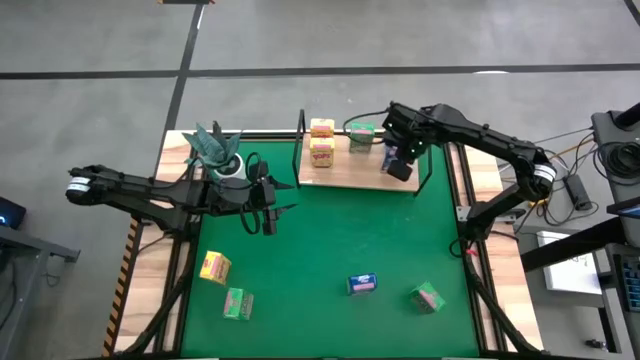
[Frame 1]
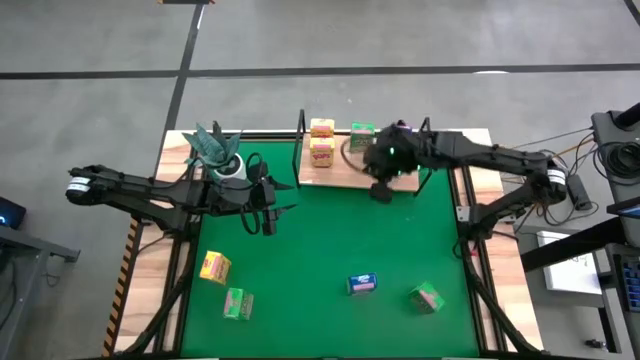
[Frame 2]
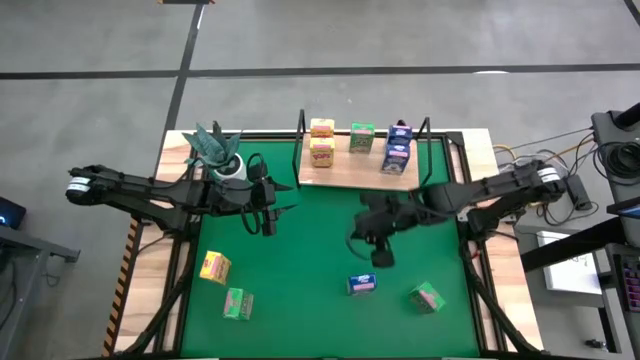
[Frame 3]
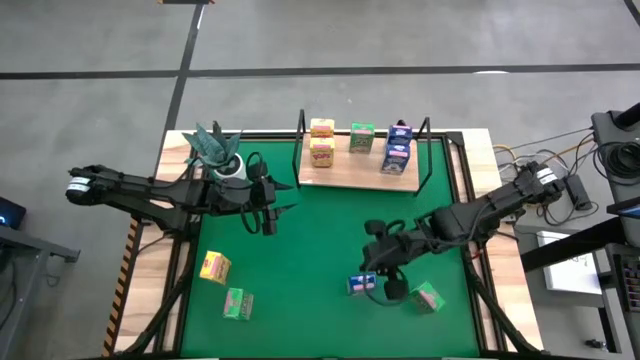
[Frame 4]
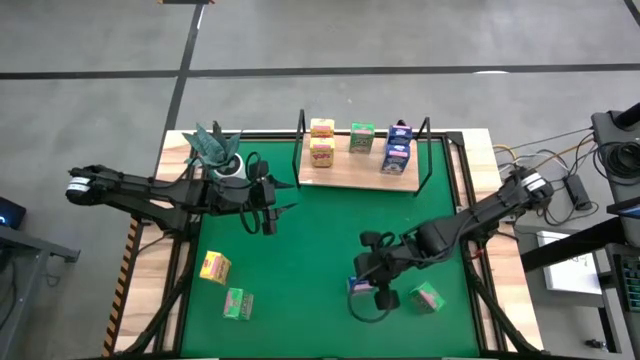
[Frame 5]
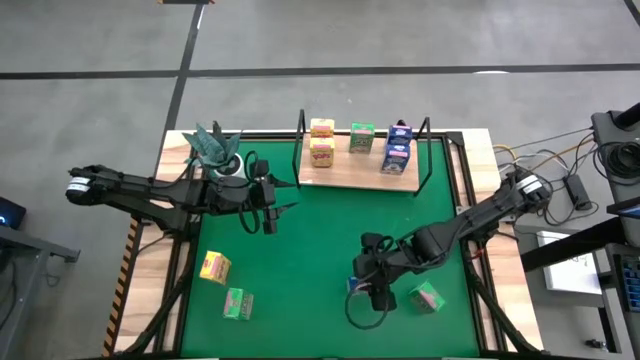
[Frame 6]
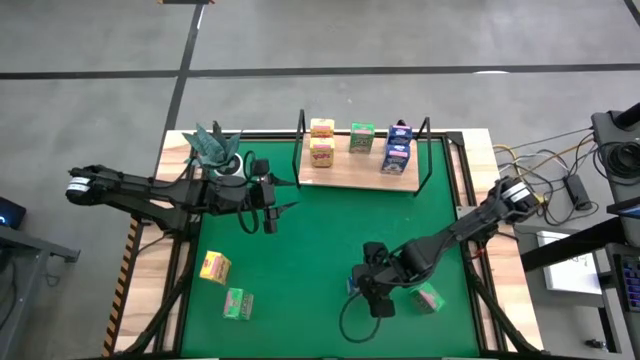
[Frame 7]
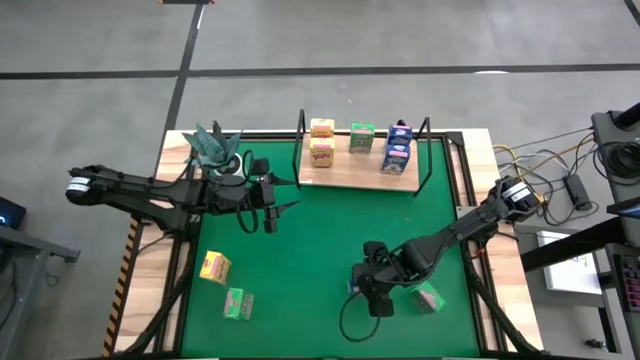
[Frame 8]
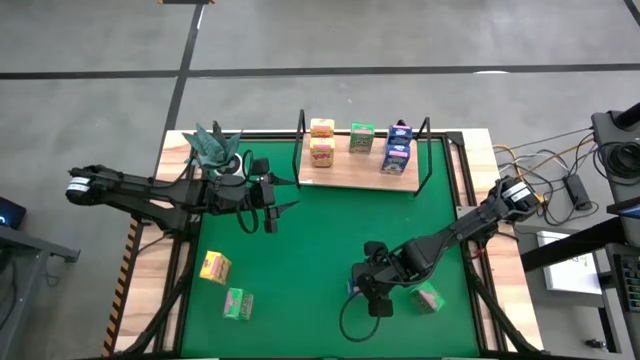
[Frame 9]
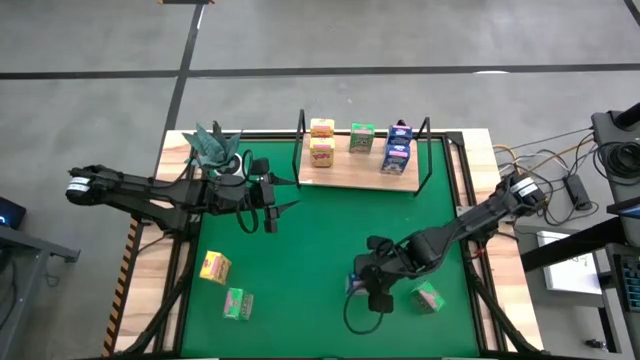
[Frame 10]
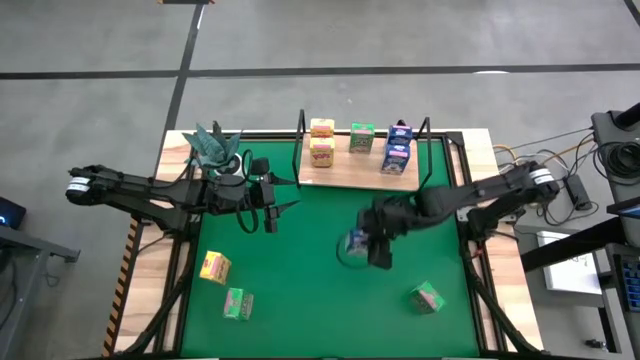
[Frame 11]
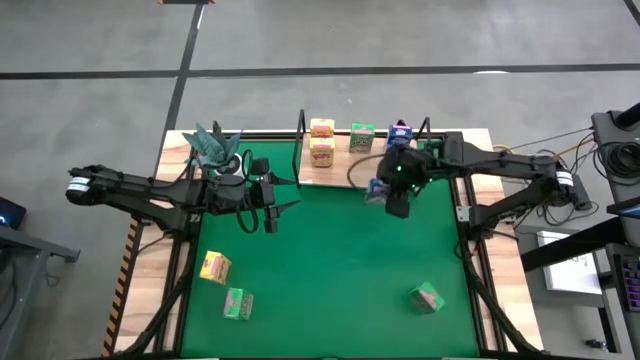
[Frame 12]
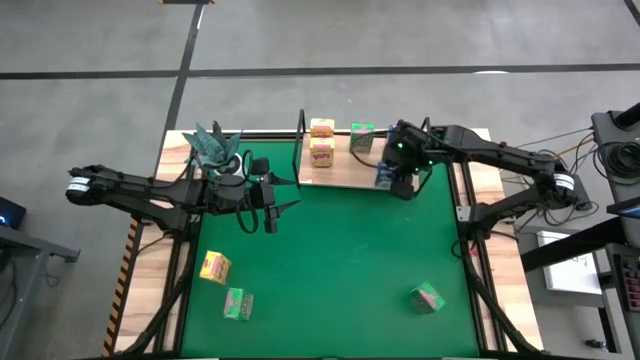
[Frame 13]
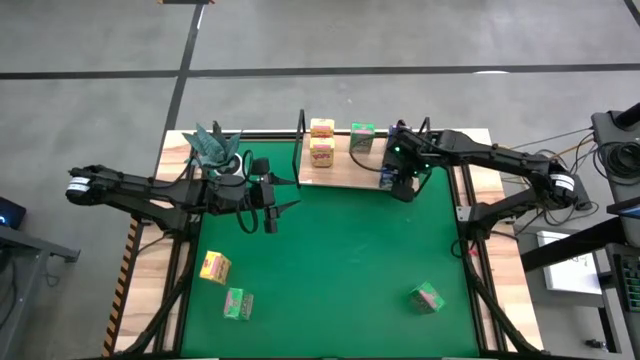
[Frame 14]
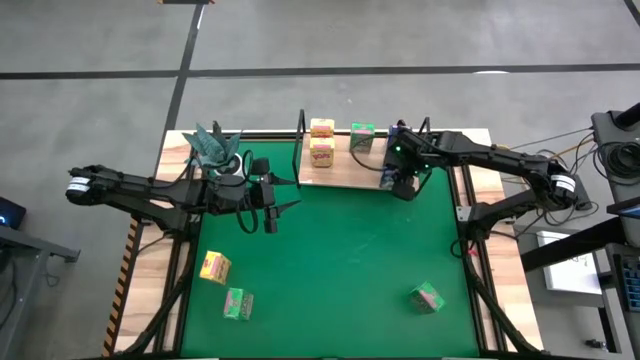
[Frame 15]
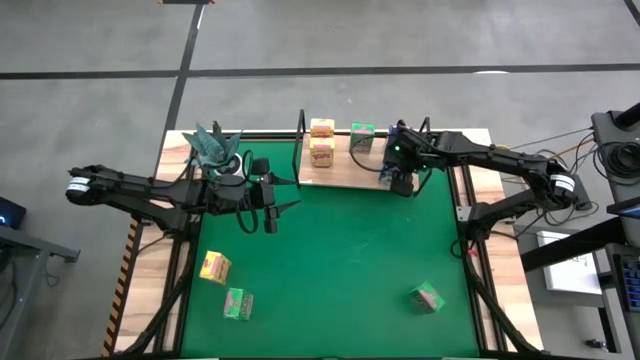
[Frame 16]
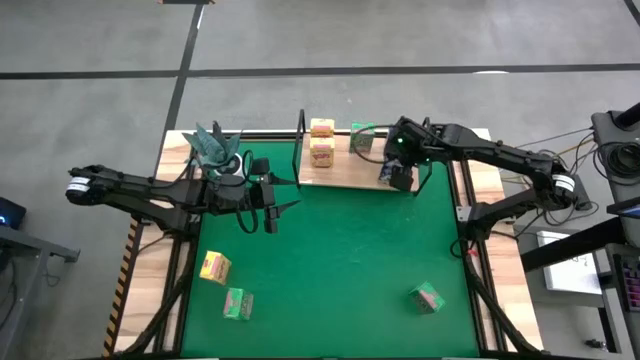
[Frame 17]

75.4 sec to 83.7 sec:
Task: Stack cereal on shelf
Put the blue cereal box on the shelf

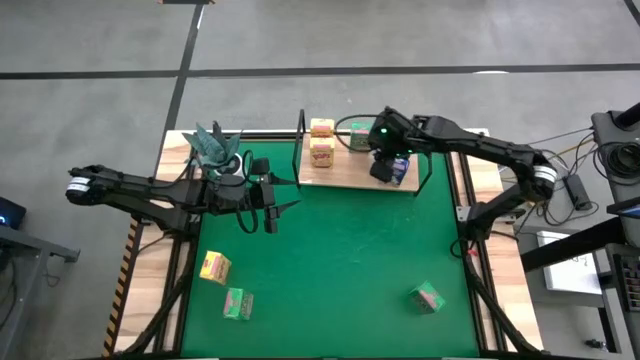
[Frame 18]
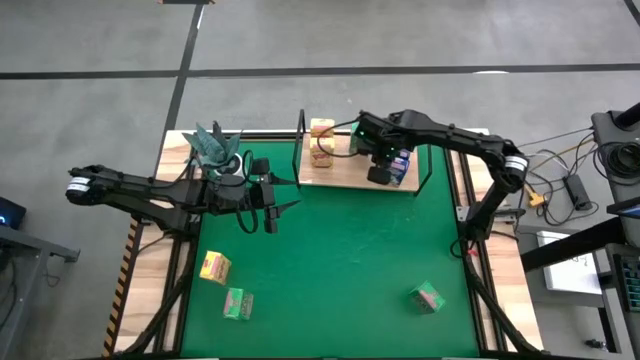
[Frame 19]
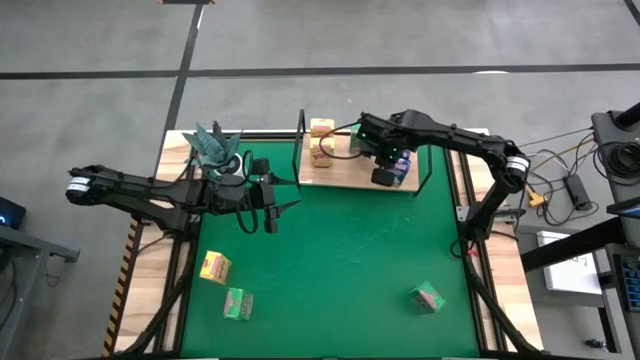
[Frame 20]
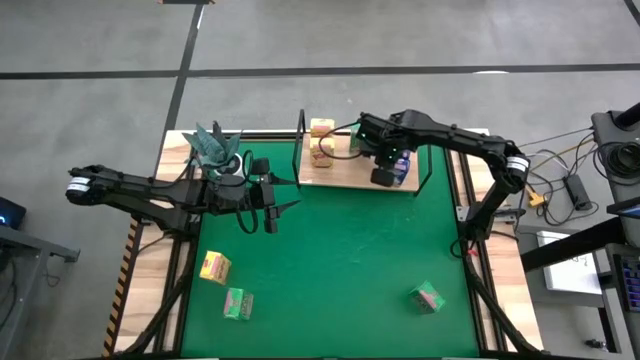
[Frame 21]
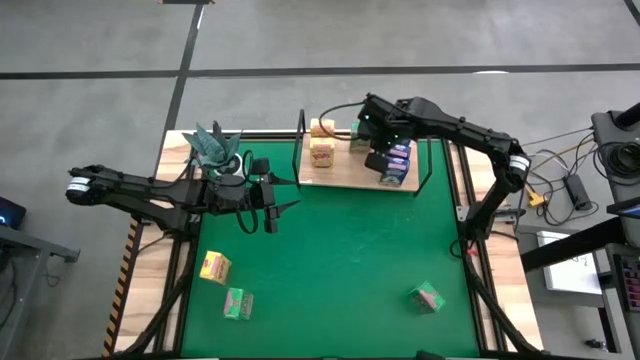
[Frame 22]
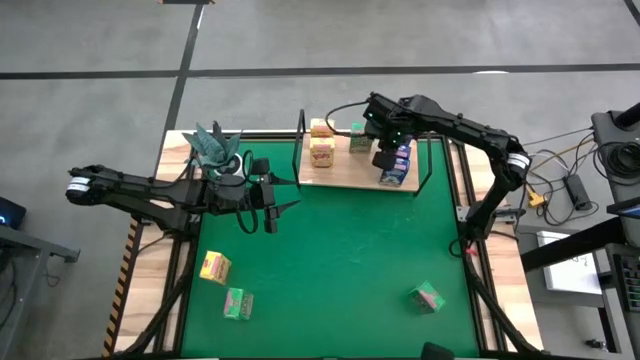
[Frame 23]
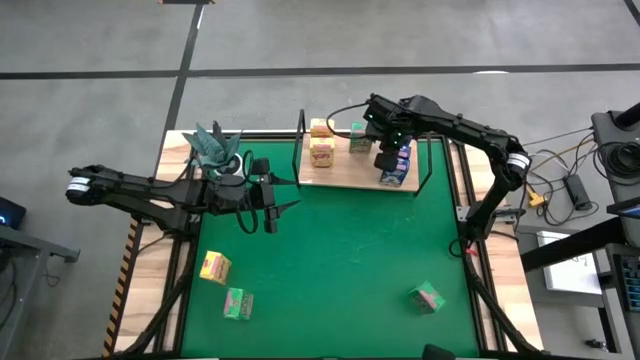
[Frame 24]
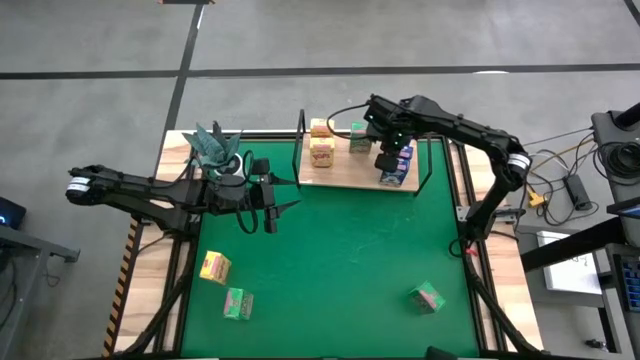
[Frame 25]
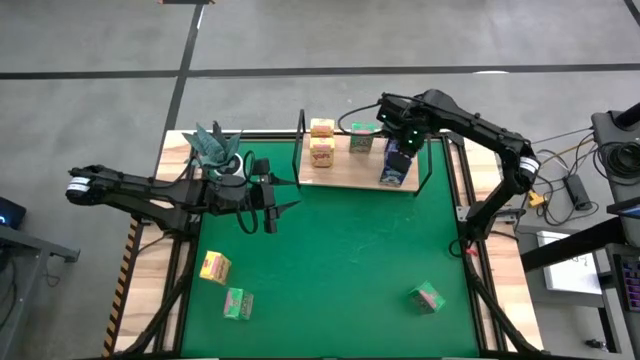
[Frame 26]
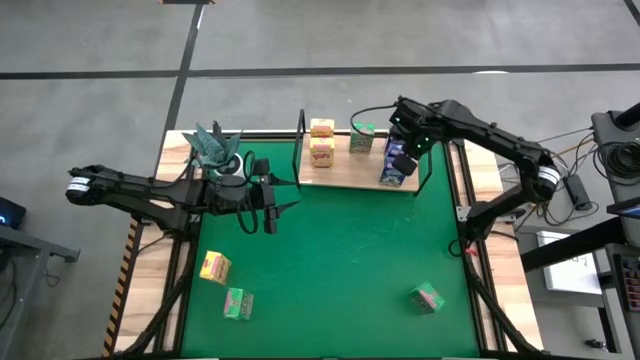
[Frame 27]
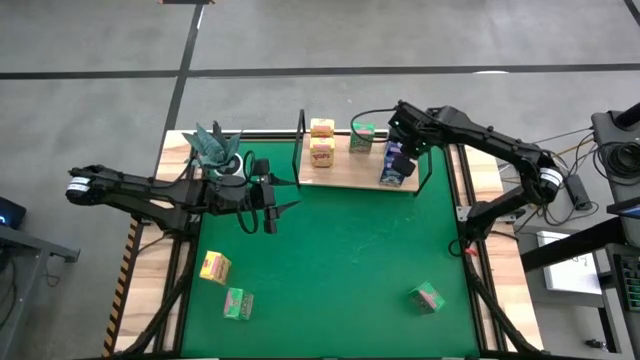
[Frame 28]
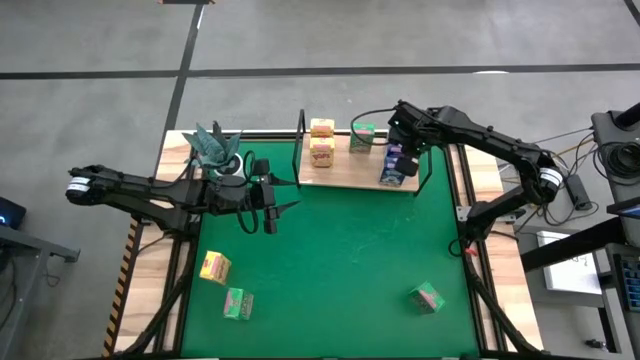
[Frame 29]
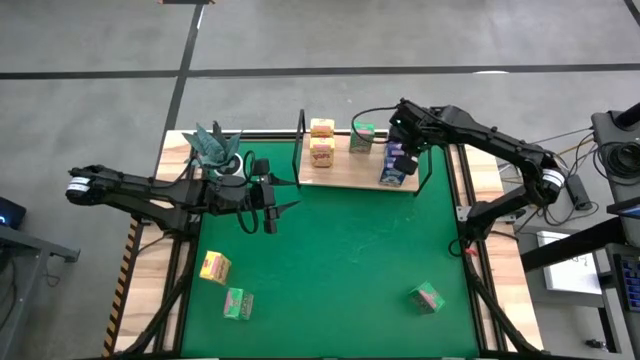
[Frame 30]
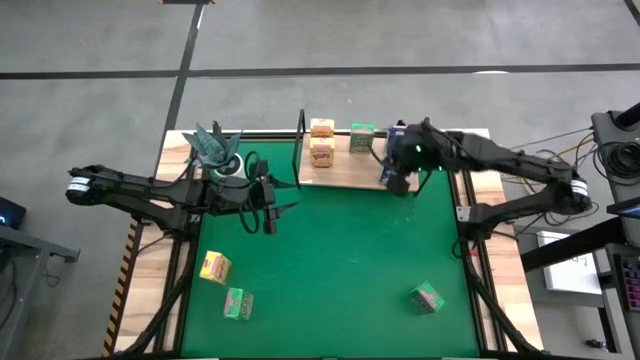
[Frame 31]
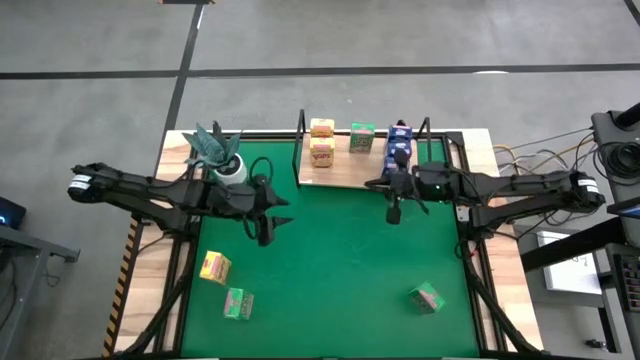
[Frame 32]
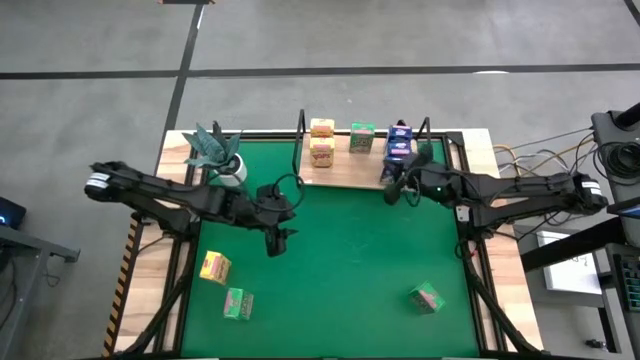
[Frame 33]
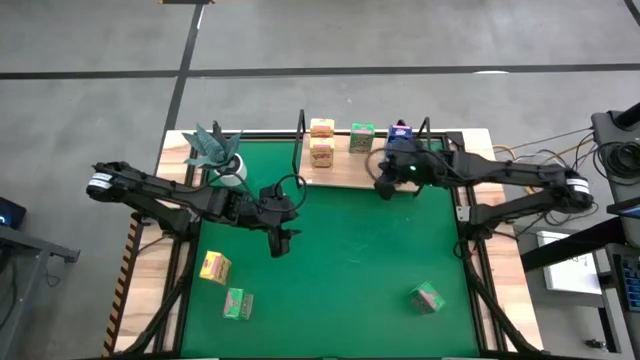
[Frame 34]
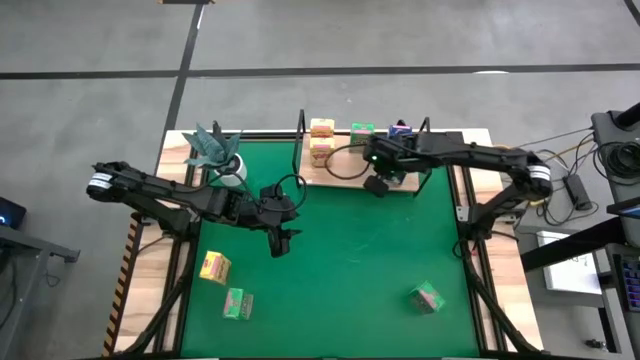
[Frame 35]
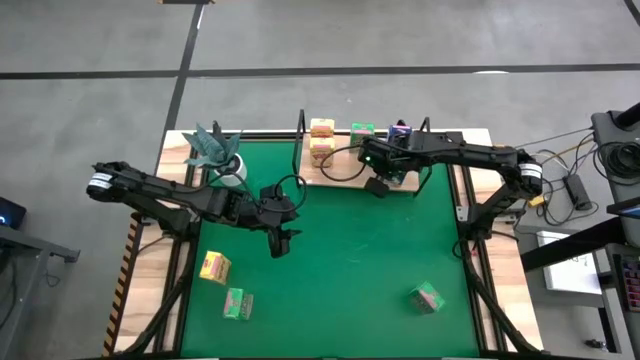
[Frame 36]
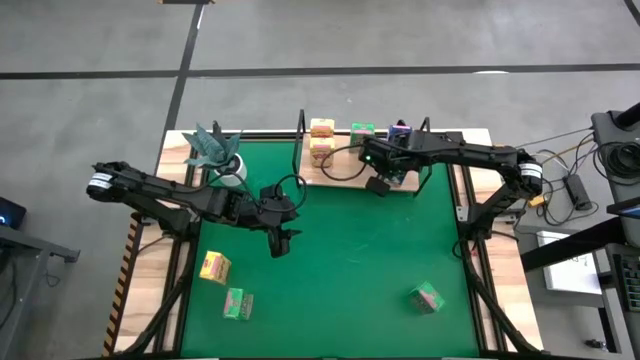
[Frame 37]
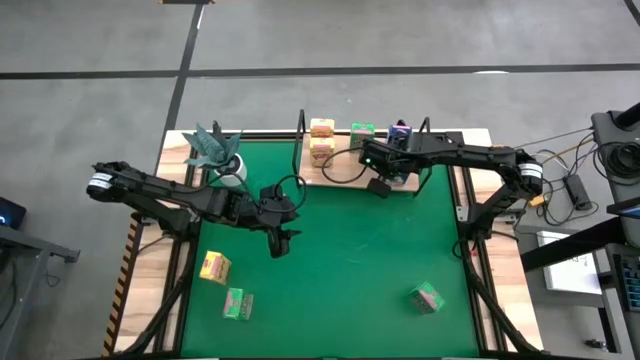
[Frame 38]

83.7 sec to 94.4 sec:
Adjust the blue cereal boxes on the shelf

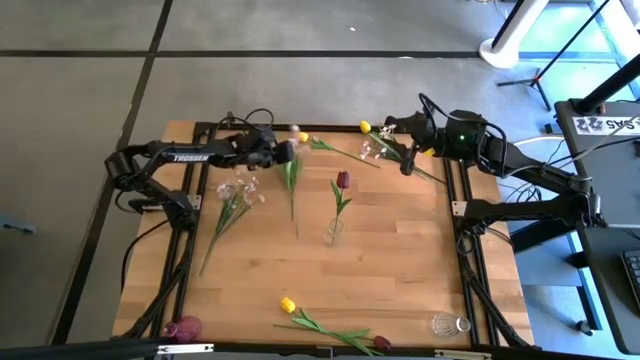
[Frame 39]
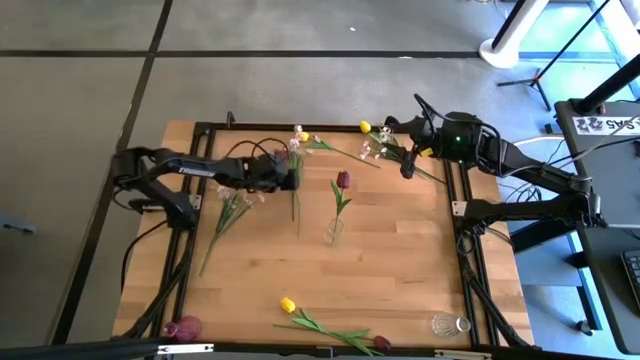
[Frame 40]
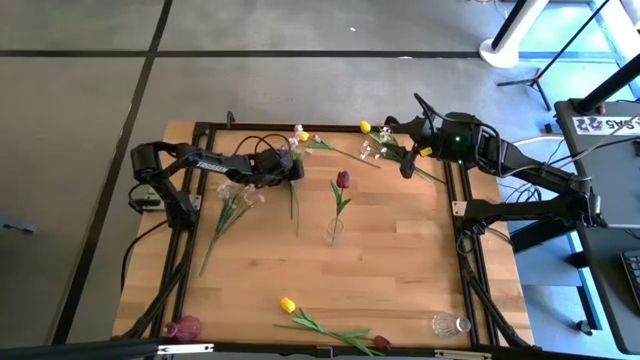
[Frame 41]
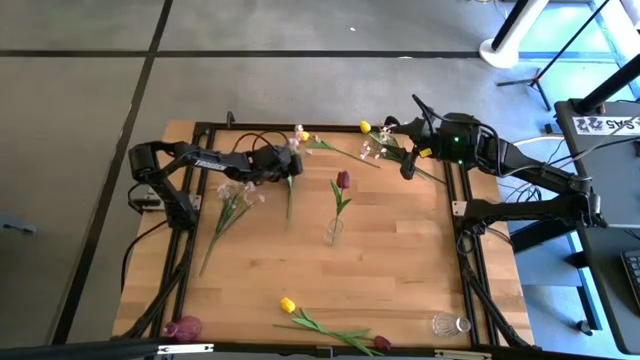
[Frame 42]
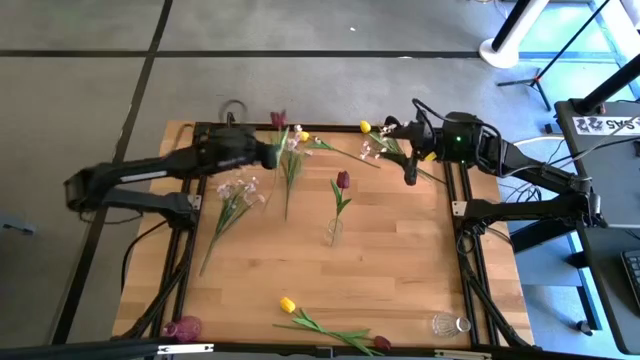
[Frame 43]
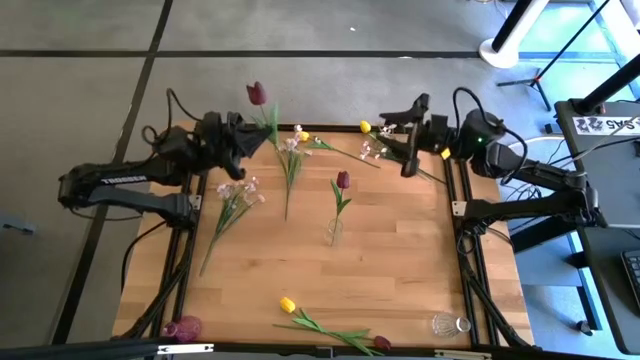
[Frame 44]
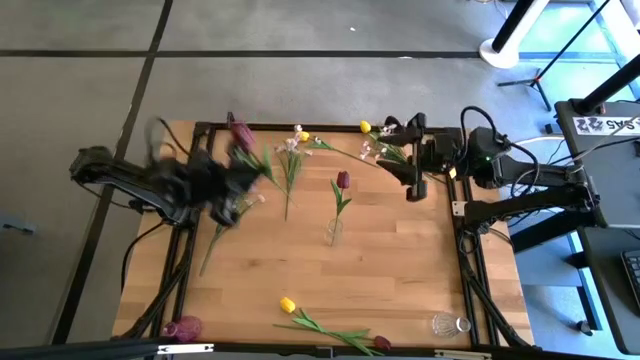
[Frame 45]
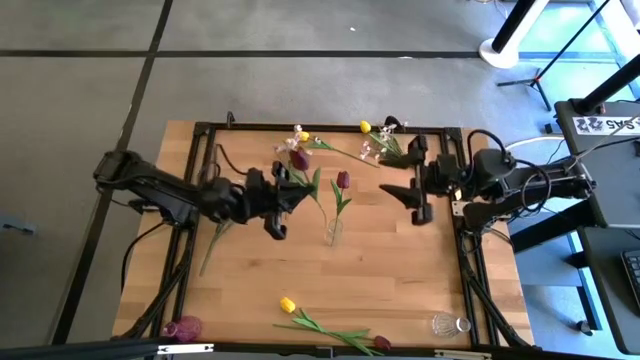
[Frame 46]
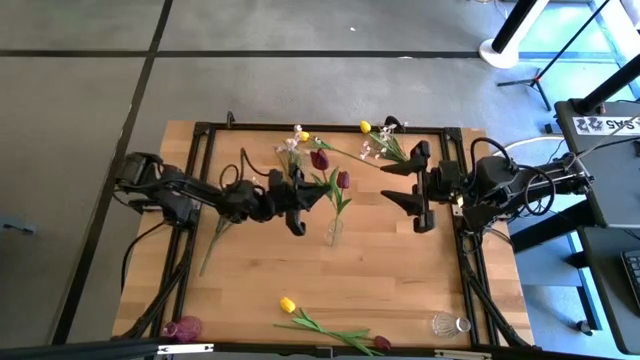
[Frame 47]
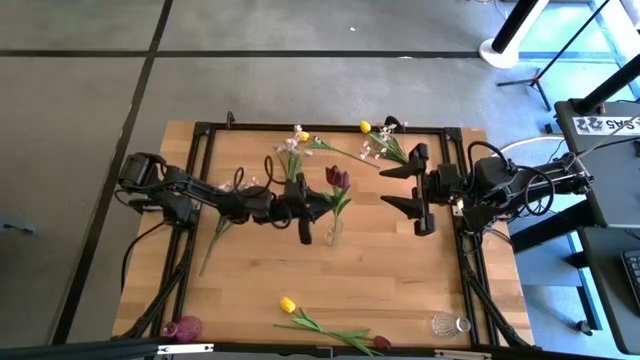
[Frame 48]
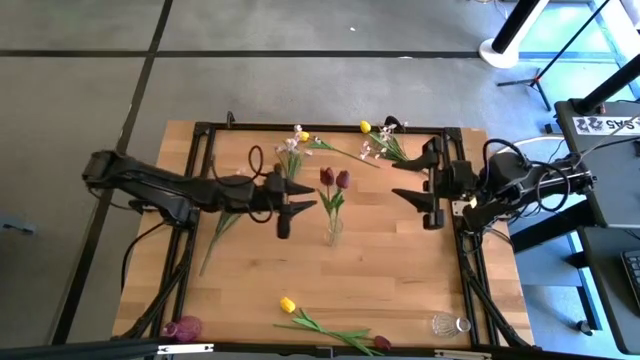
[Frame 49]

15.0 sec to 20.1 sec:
Task: Sort flowers into vase by color
Put the top red tulip into the top transparent vase
